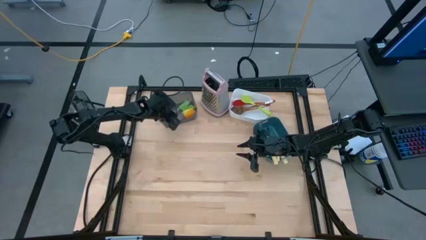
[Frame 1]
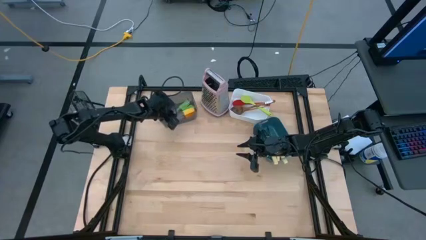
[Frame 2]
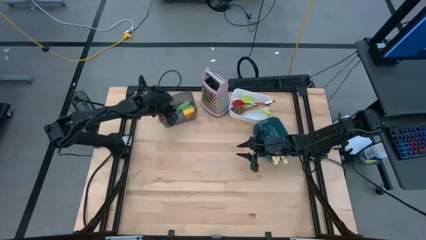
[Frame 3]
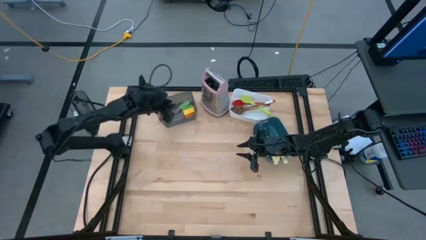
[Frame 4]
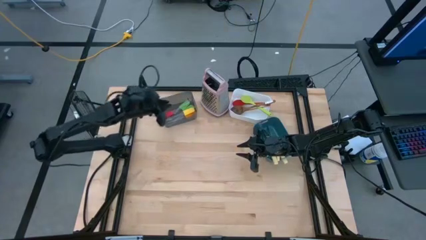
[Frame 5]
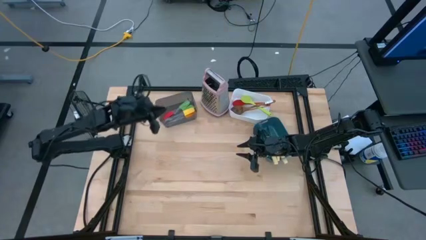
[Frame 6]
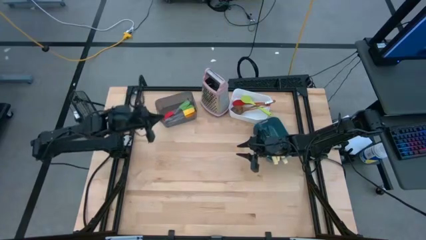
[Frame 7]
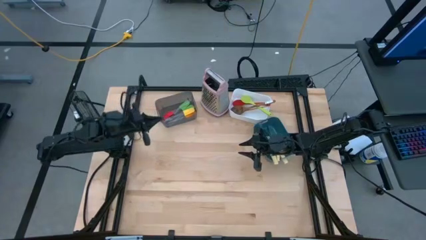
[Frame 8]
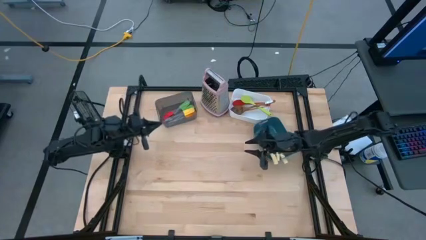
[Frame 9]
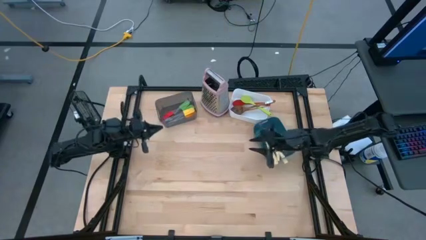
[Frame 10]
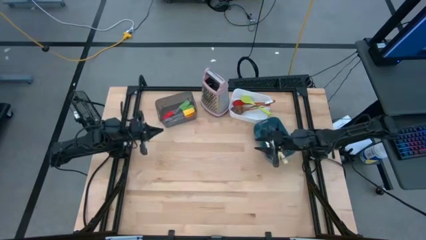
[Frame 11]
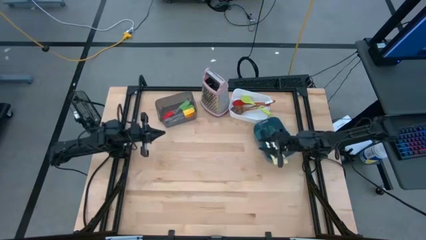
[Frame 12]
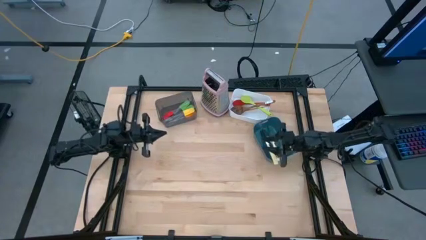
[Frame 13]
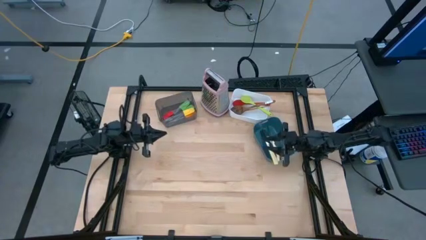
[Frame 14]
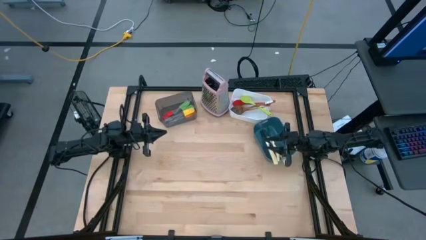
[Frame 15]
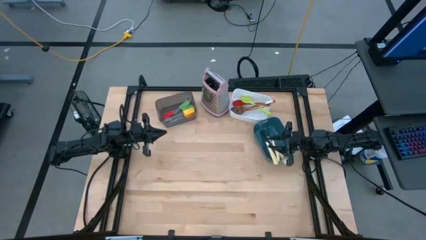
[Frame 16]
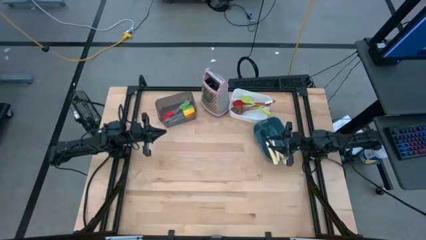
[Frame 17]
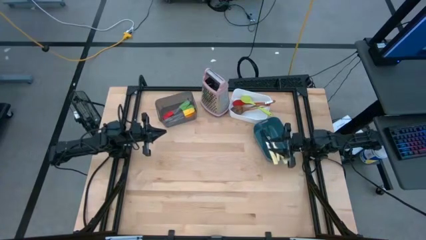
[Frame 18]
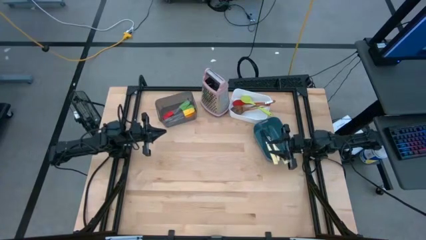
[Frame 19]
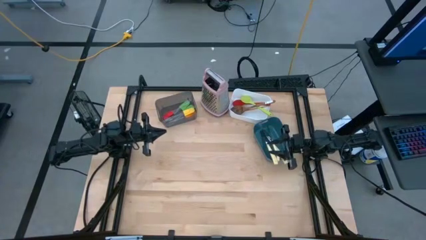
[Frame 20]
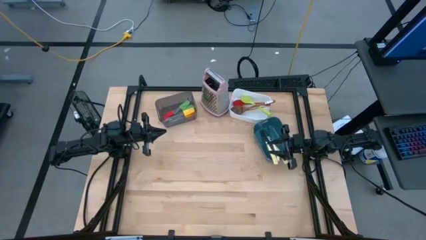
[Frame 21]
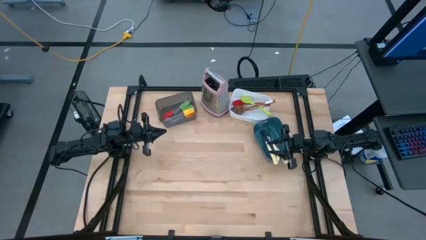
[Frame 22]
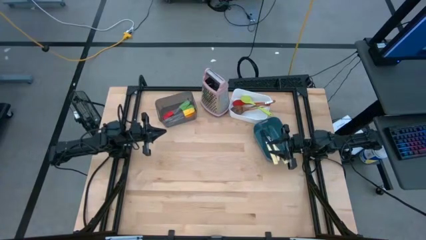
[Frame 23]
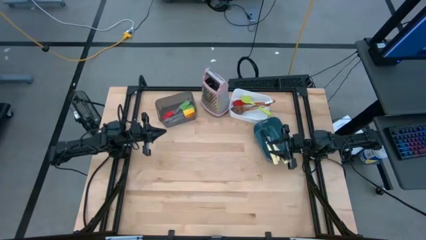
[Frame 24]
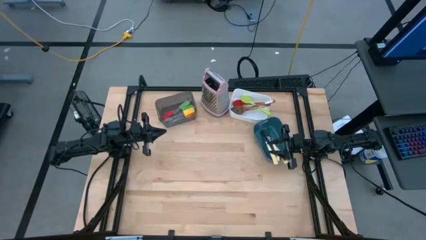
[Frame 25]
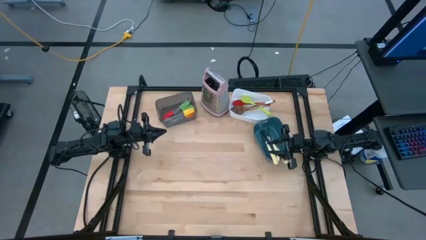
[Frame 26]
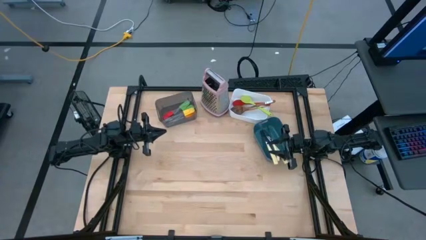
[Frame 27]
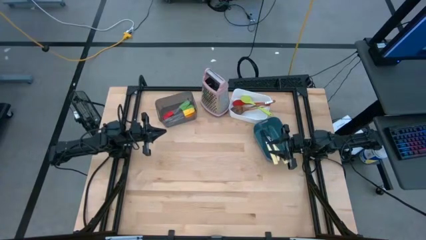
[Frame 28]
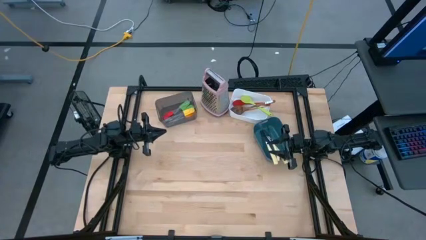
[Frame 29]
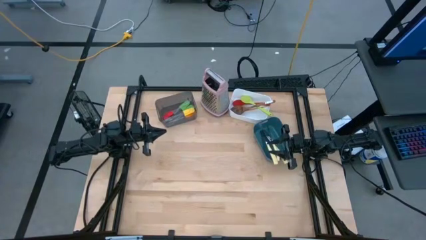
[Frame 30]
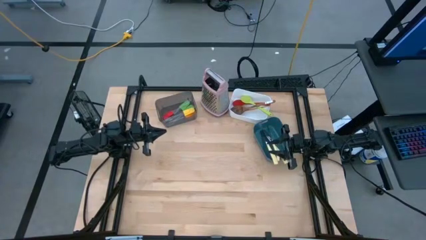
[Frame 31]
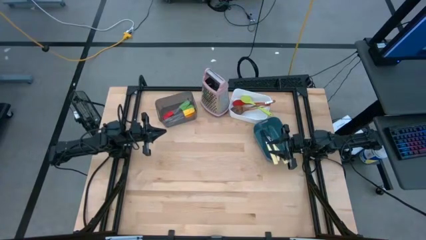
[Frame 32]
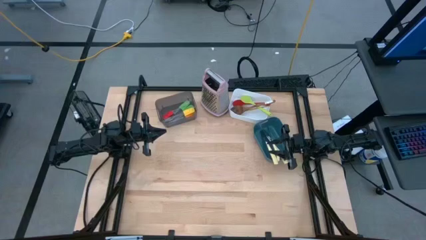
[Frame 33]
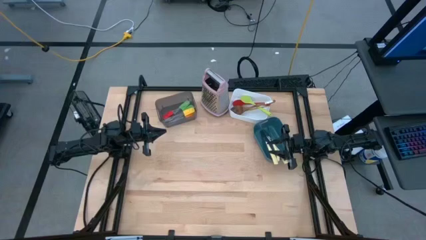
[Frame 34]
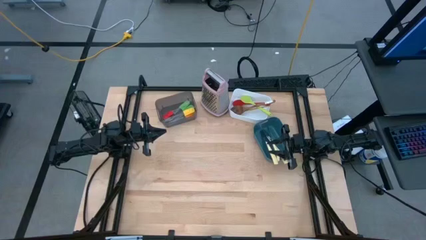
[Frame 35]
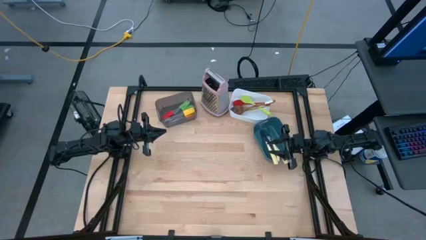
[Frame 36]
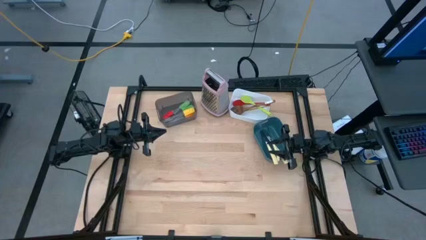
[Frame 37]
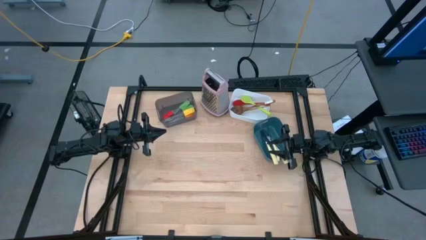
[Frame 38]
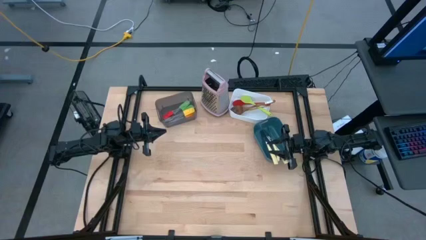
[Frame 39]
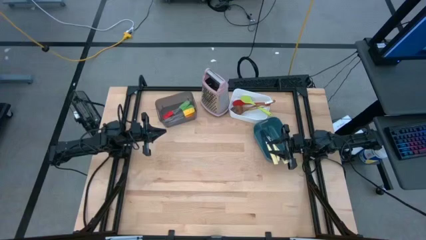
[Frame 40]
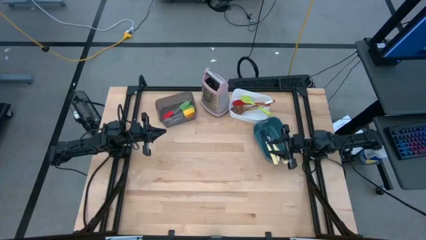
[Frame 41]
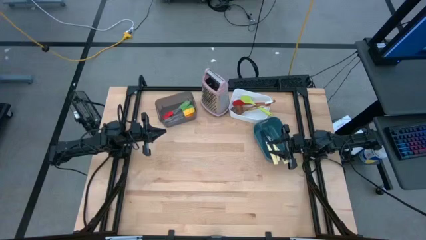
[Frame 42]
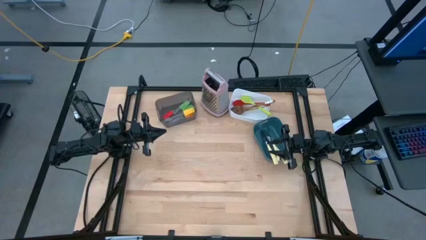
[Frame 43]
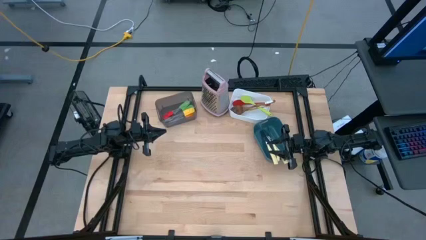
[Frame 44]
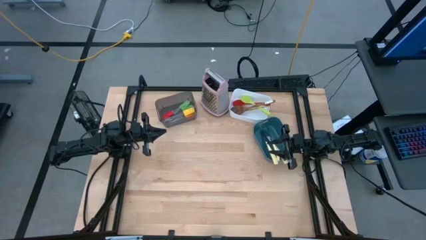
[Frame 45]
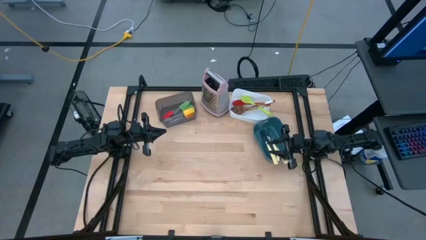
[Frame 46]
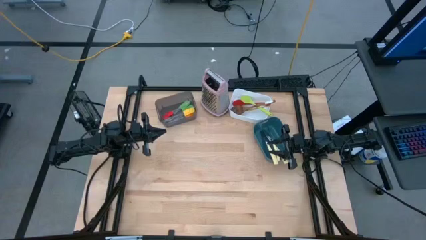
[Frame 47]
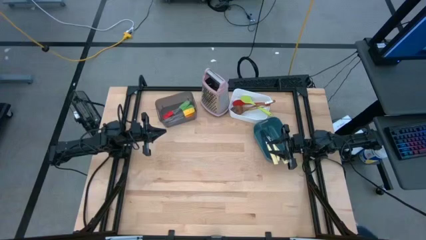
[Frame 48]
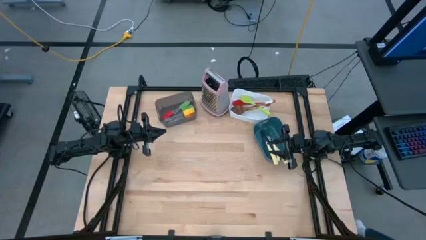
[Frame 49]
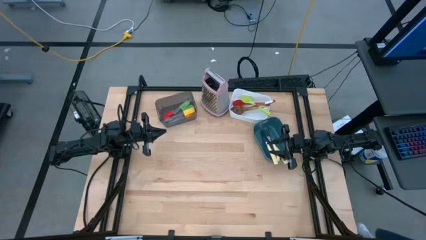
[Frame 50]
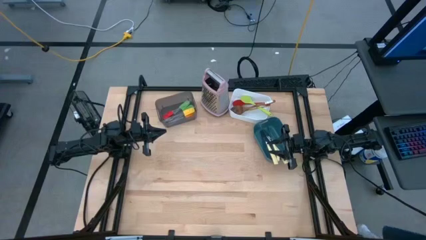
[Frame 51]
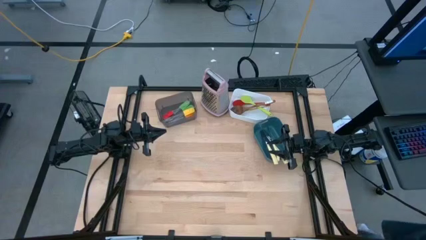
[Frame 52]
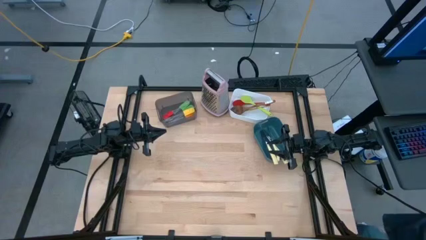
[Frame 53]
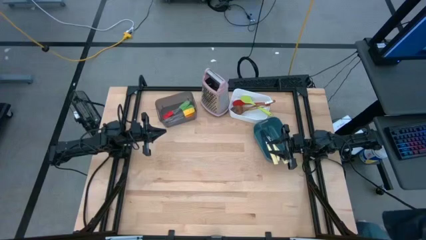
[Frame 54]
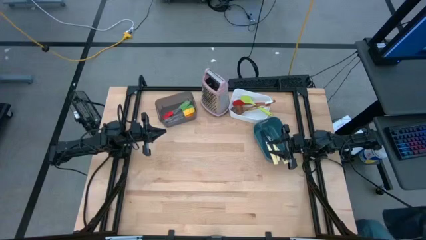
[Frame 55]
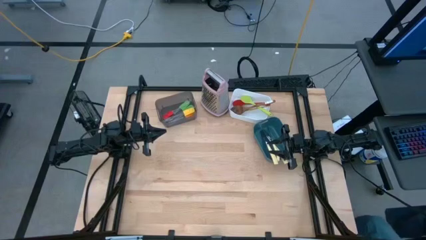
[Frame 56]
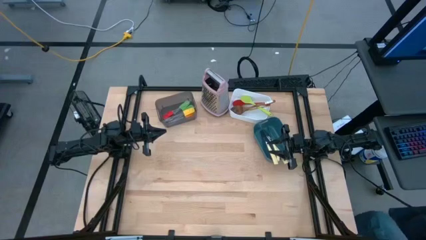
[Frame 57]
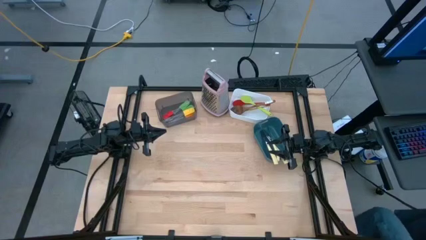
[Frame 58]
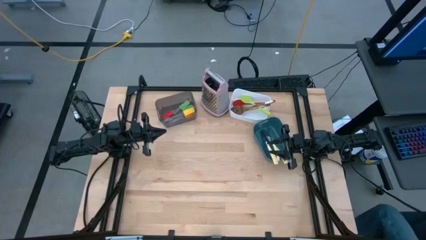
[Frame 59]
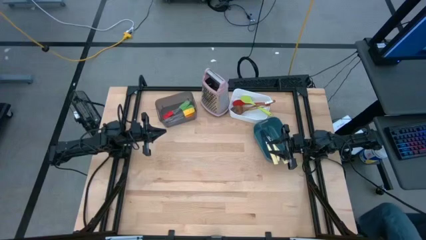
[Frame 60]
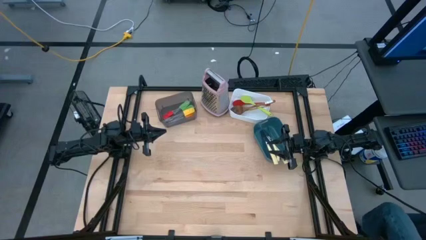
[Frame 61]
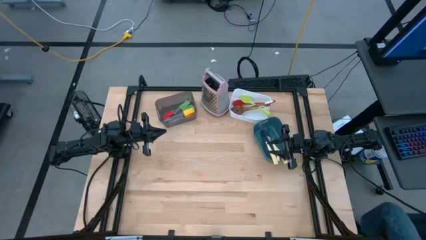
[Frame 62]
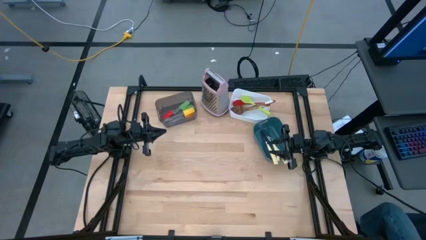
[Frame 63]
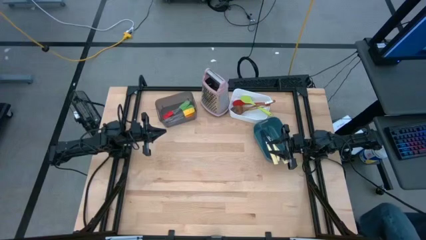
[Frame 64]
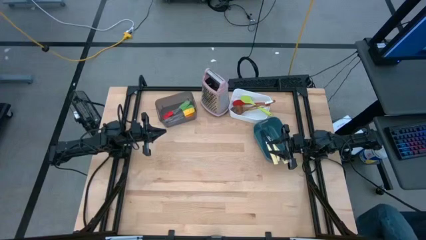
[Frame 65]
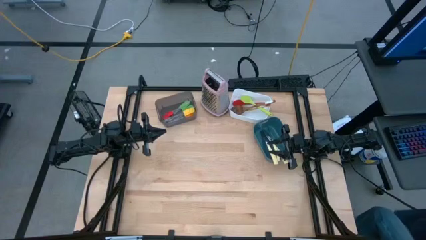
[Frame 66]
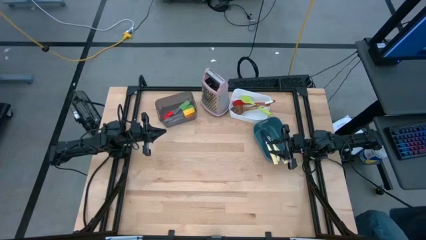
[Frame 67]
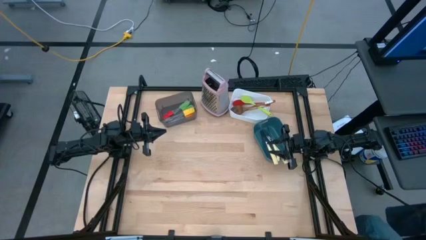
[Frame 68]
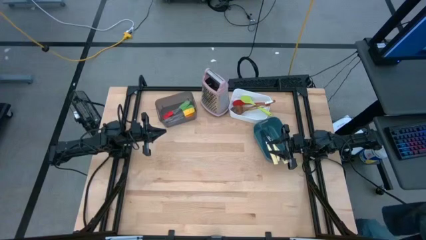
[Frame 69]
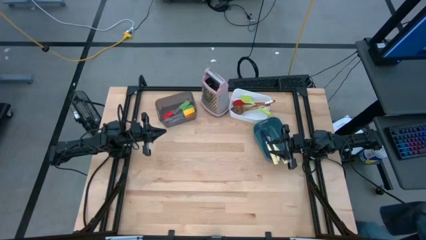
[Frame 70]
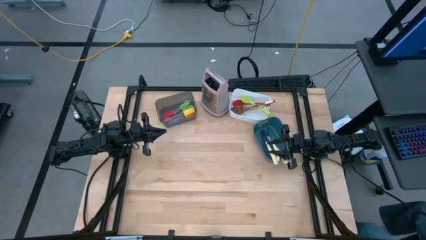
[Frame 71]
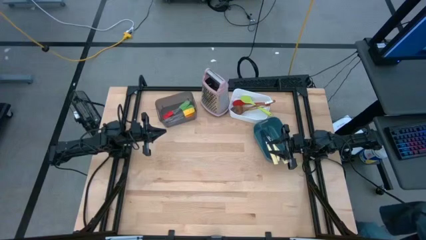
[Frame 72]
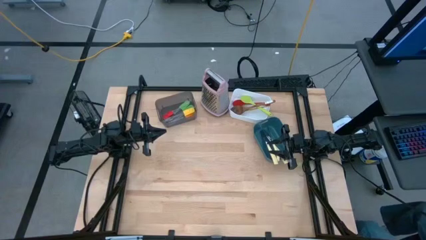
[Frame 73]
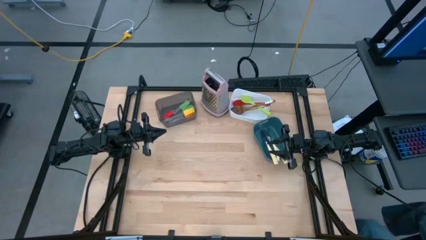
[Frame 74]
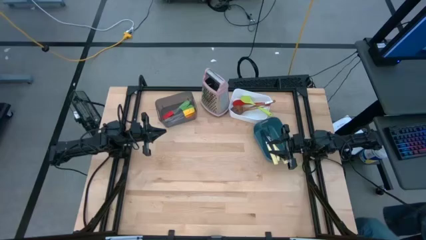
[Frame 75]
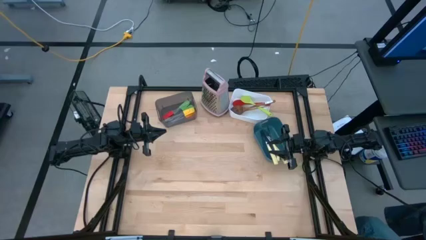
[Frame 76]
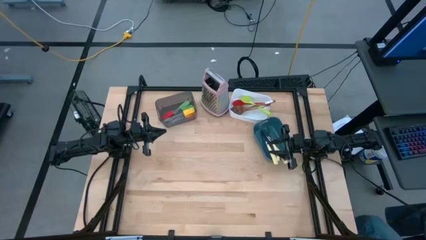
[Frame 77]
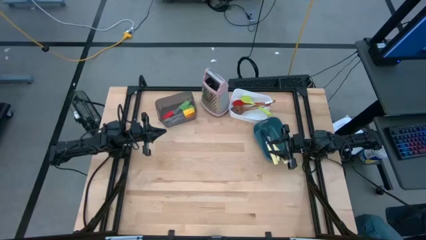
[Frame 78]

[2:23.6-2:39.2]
Task: Pick & Place Kitchen Items
Return to Home Position
